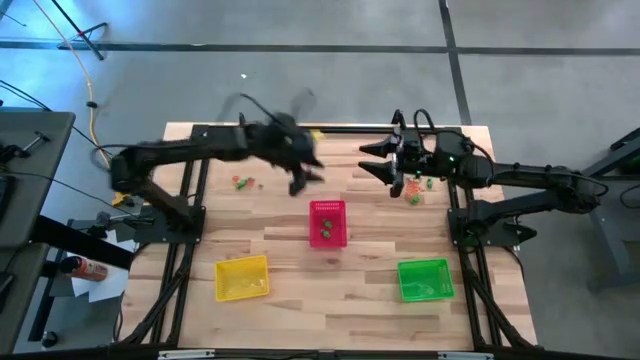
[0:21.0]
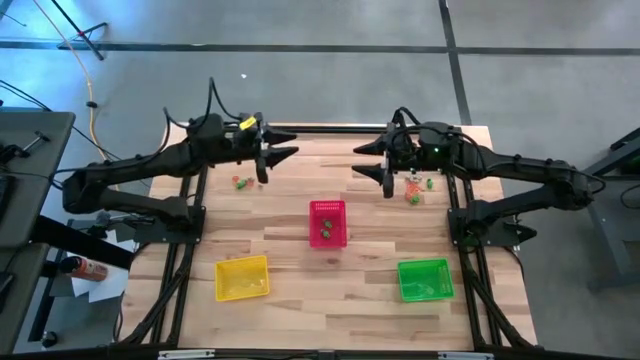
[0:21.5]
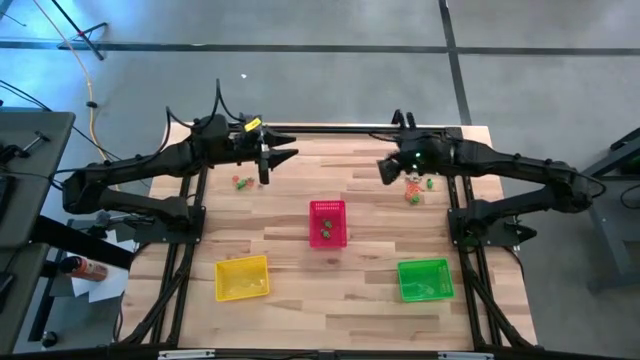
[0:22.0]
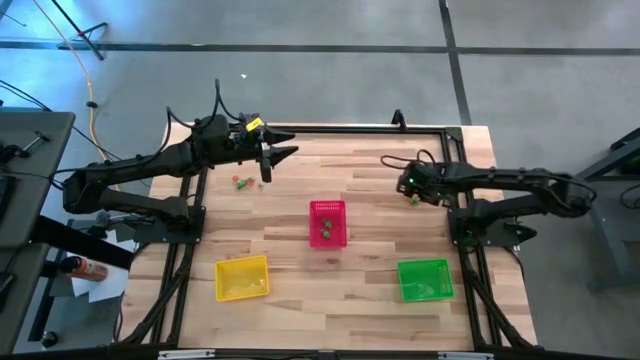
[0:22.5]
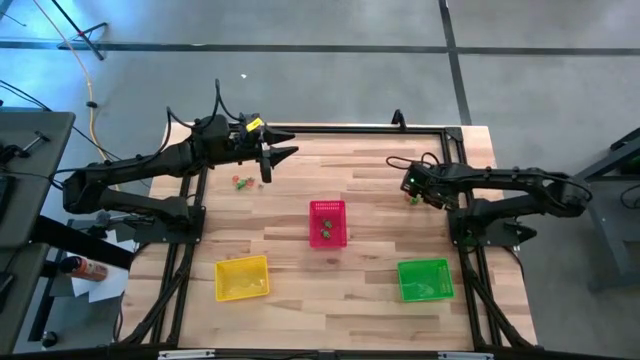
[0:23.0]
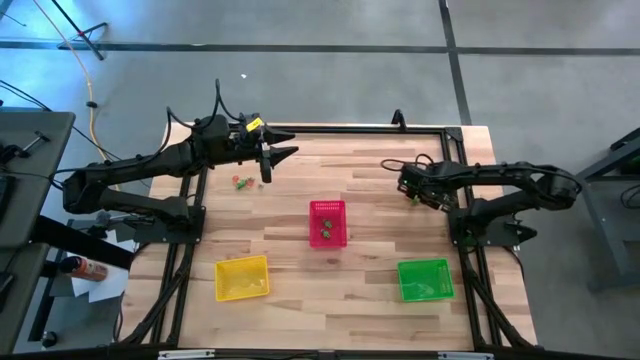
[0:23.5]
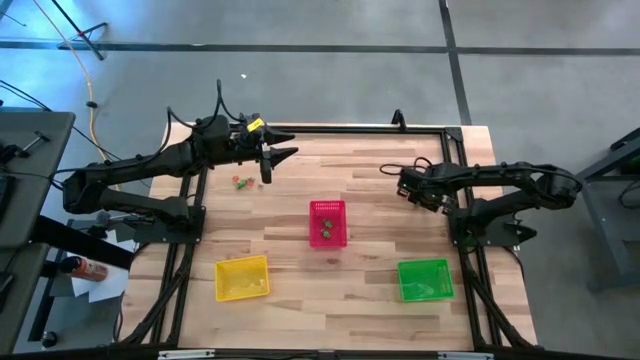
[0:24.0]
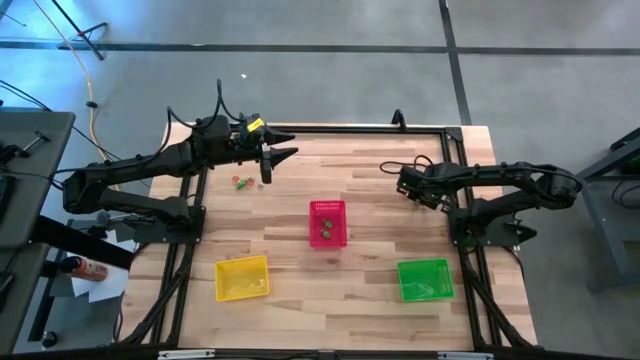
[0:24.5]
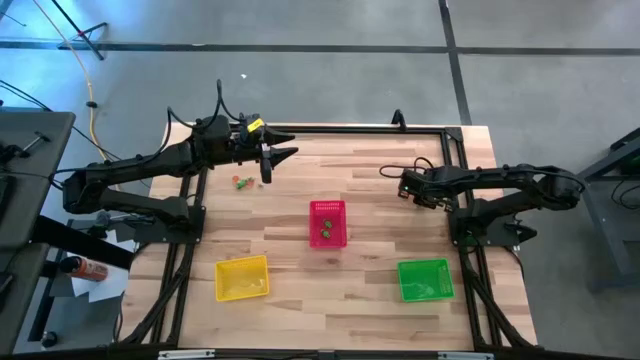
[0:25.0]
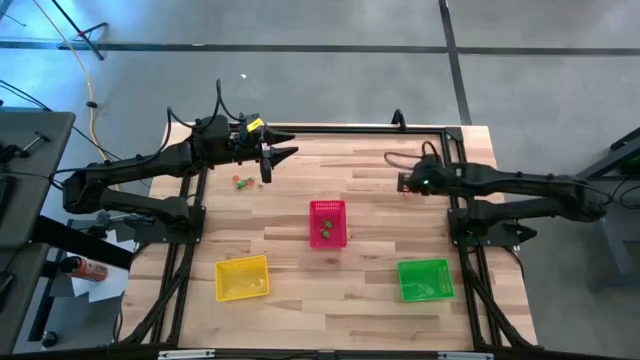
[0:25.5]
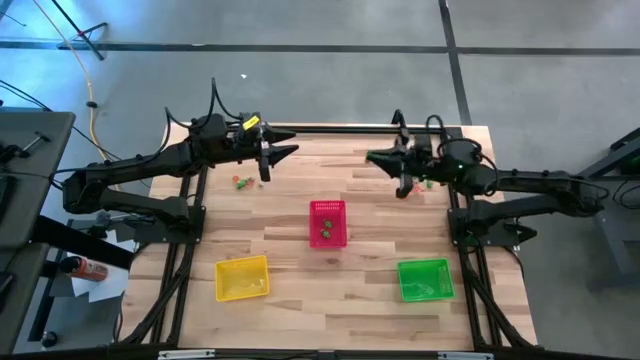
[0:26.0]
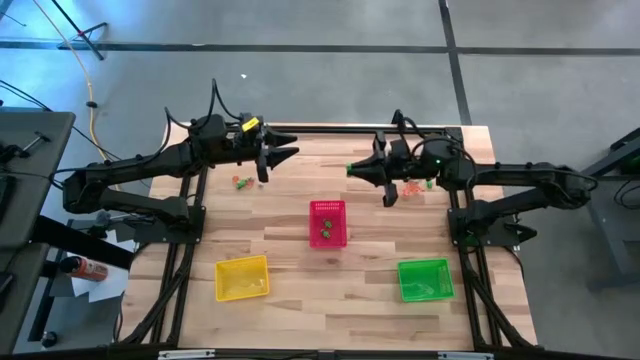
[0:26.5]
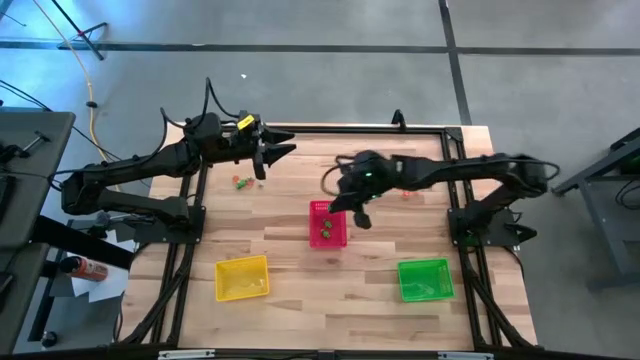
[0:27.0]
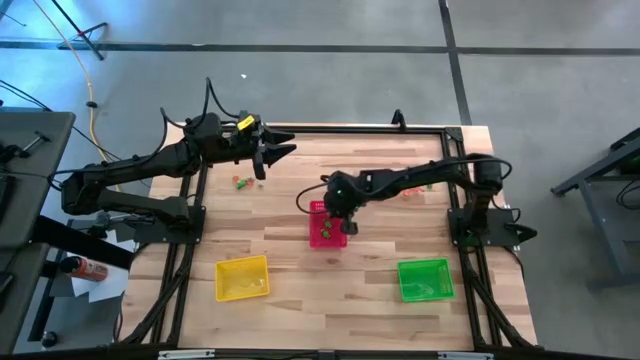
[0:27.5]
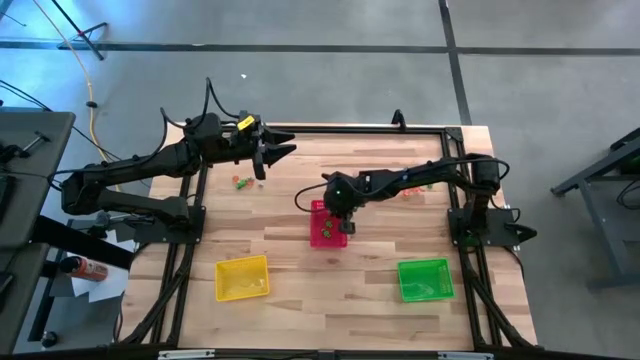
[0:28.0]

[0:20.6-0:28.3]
Task: Sort Halloween decoration
Put the green skeleton toy into the red bin

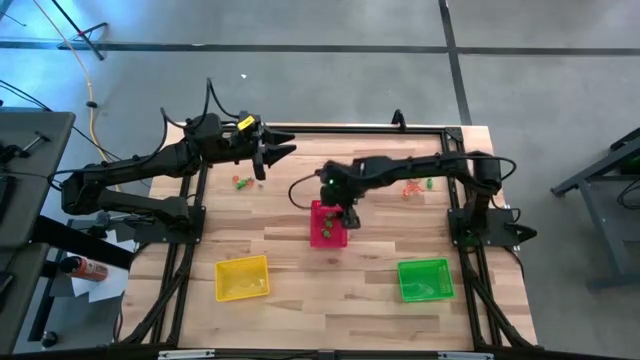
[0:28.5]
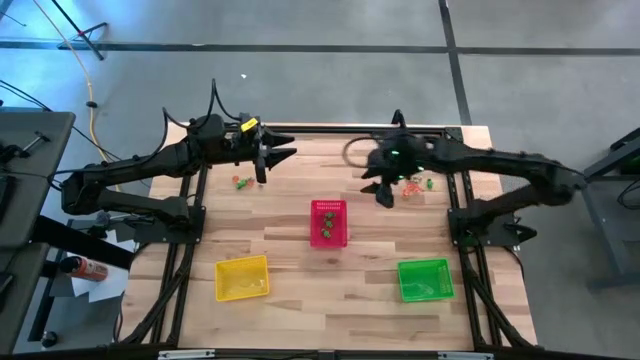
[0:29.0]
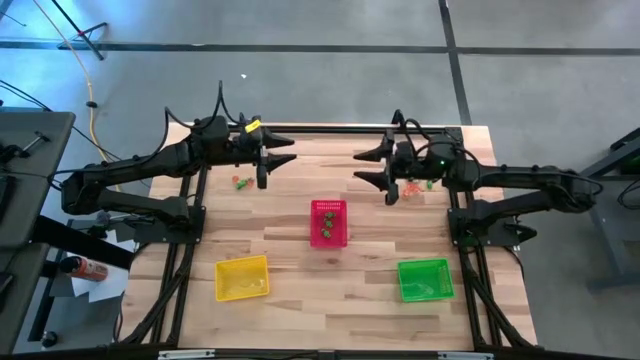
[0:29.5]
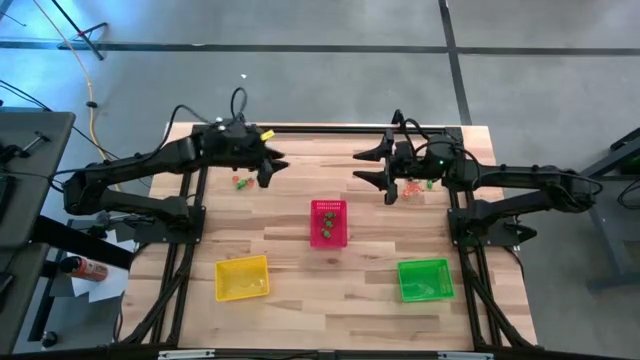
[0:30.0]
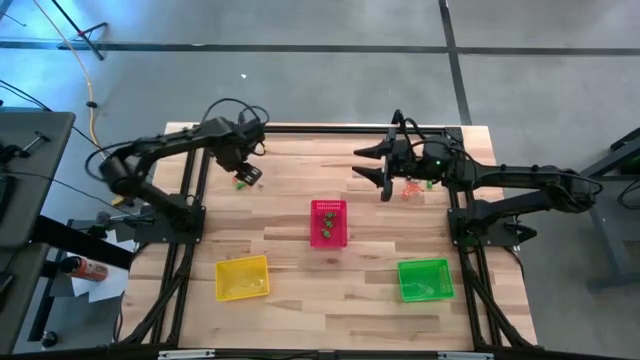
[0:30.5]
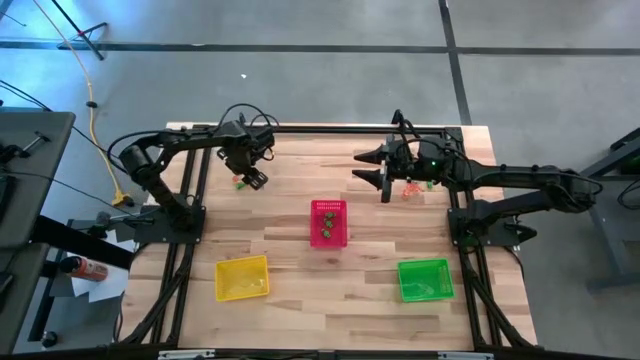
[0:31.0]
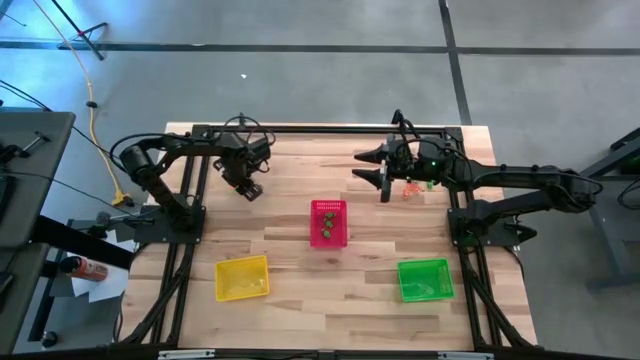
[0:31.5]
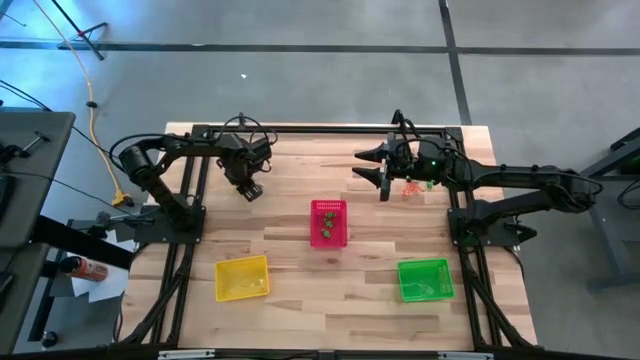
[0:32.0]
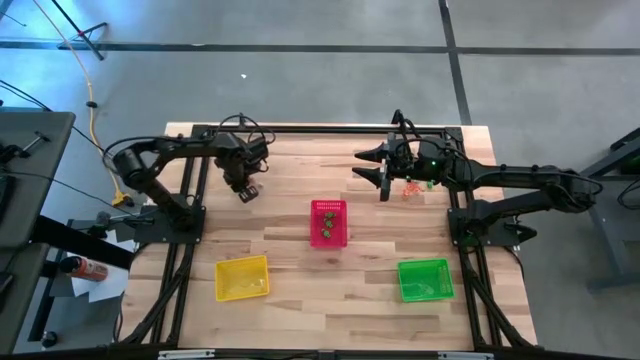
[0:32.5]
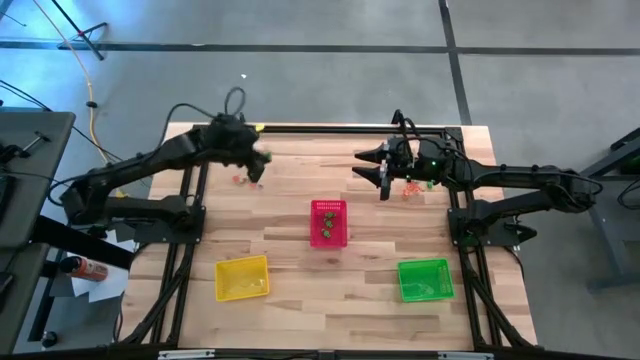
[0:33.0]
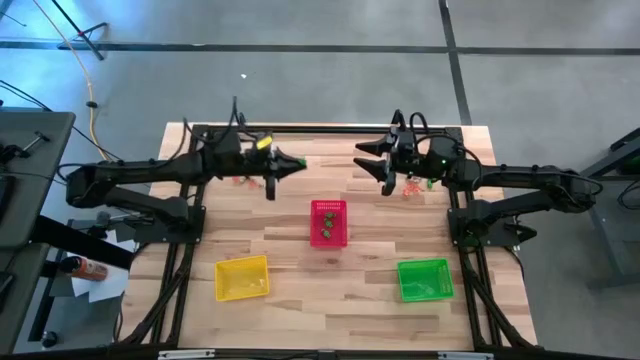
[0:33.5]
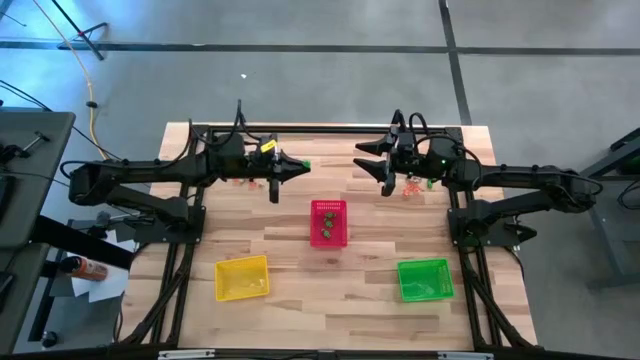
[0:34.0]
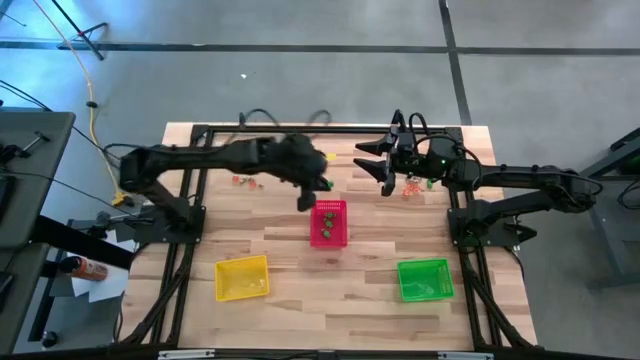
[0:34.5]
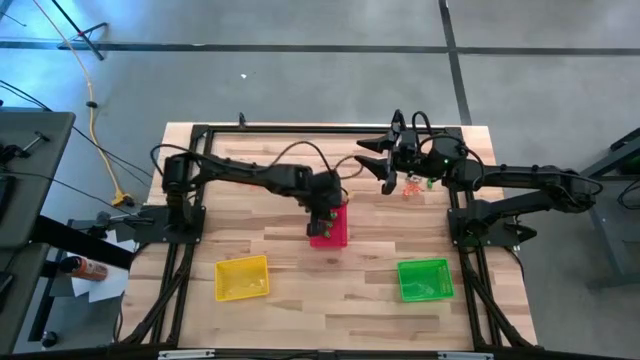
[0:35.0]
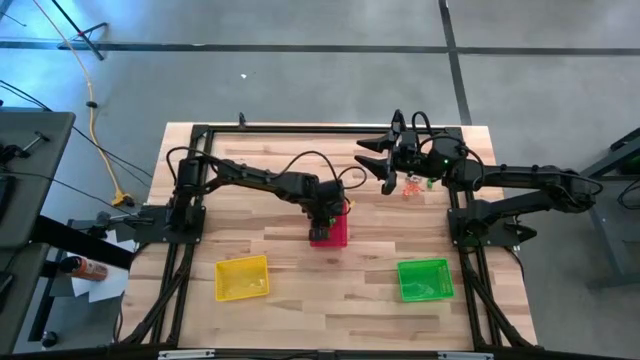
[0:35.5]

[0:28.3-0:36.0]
Put the green skeleton toy into the red bin

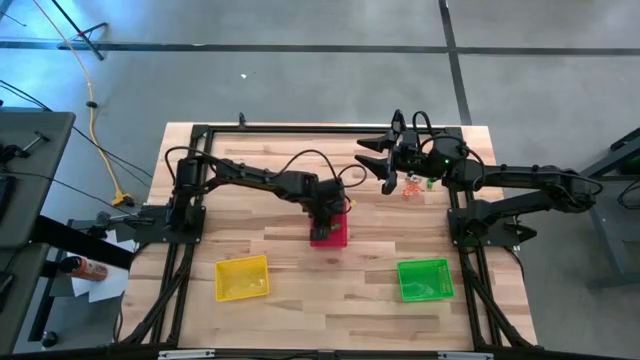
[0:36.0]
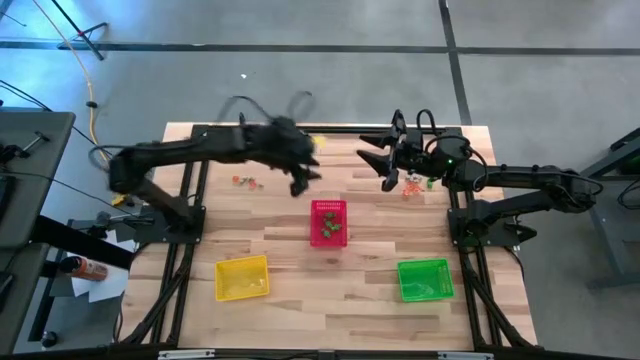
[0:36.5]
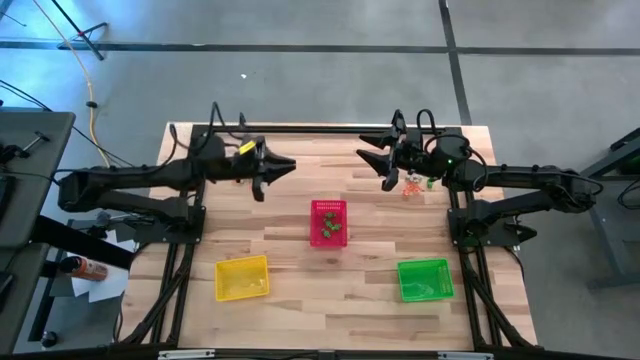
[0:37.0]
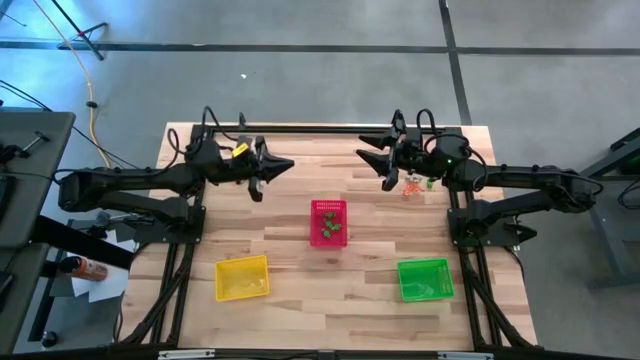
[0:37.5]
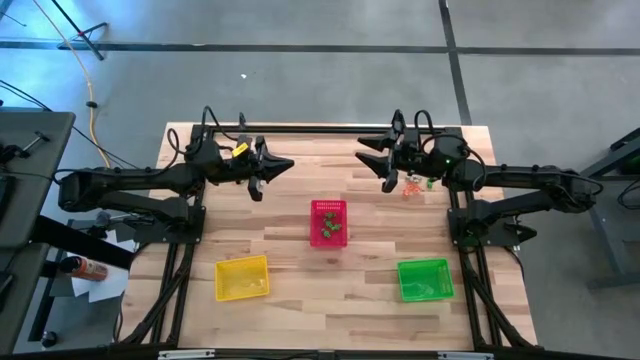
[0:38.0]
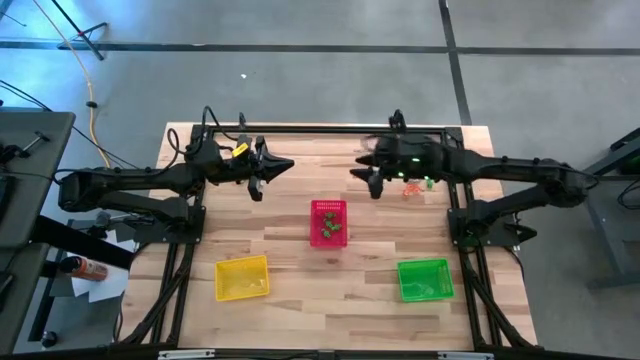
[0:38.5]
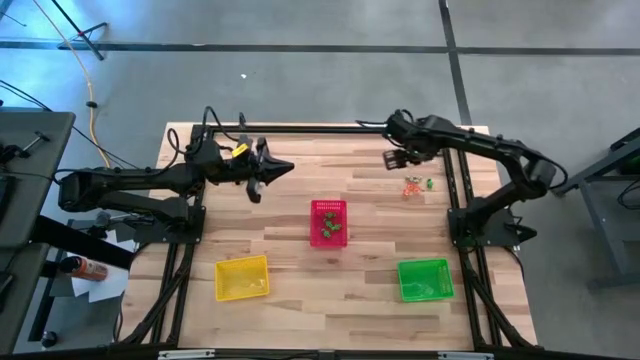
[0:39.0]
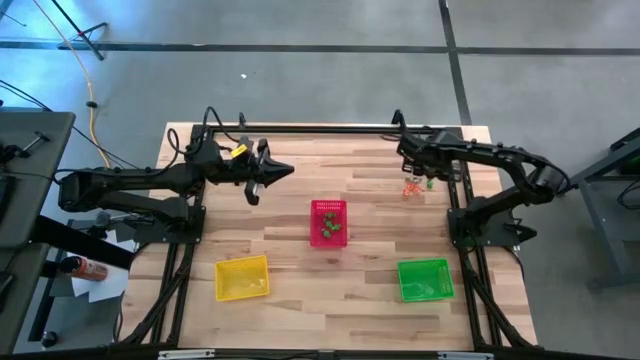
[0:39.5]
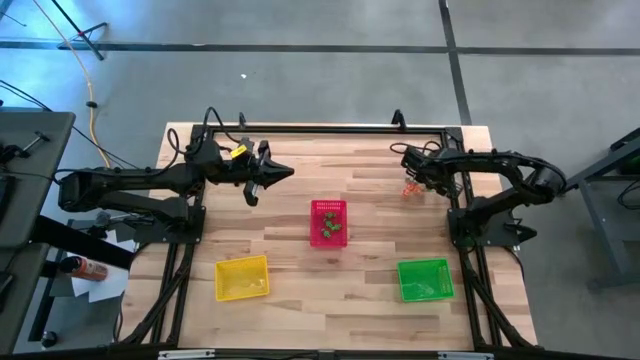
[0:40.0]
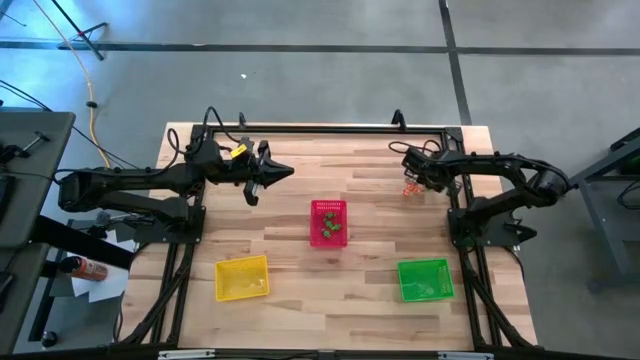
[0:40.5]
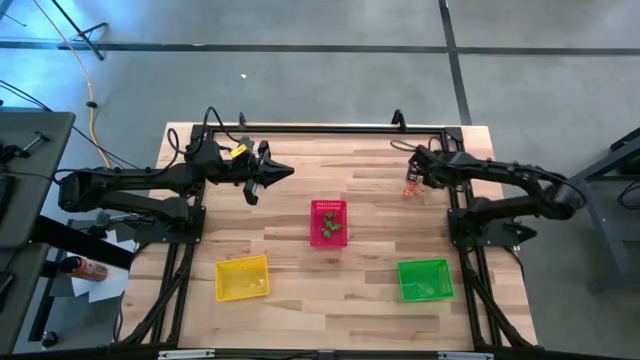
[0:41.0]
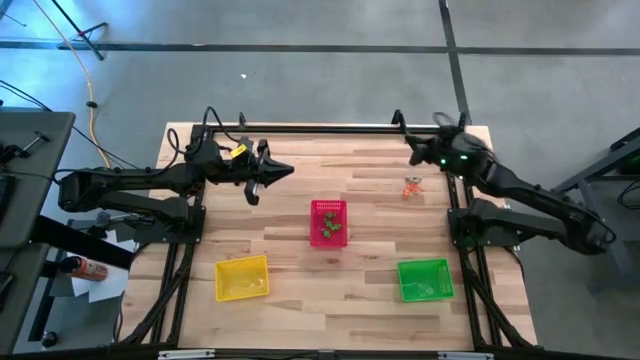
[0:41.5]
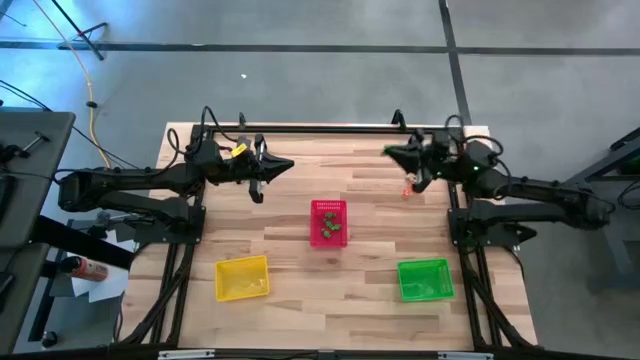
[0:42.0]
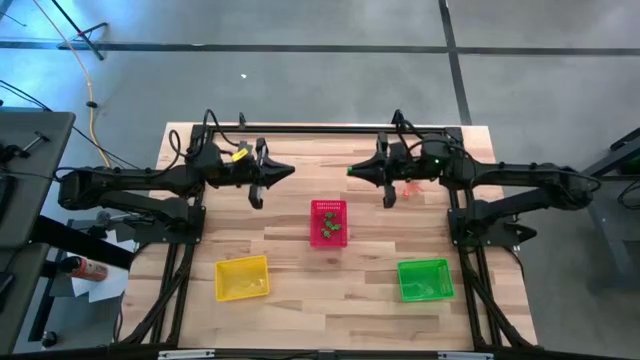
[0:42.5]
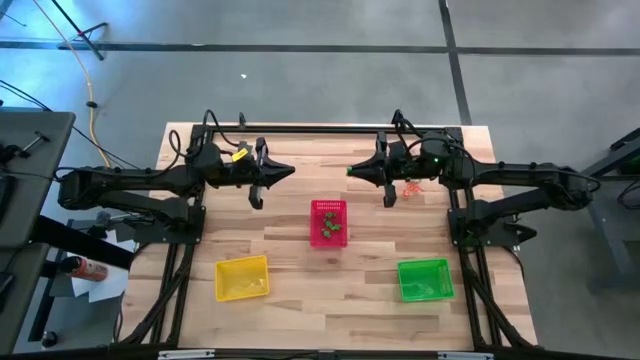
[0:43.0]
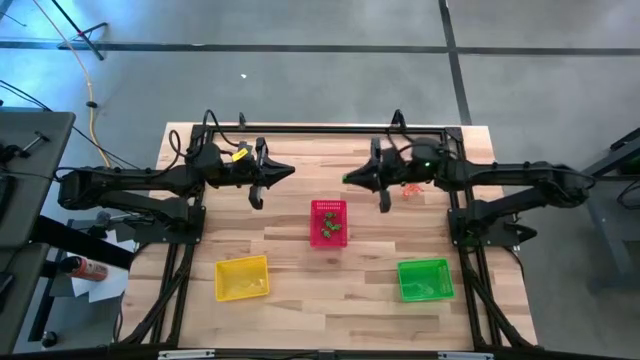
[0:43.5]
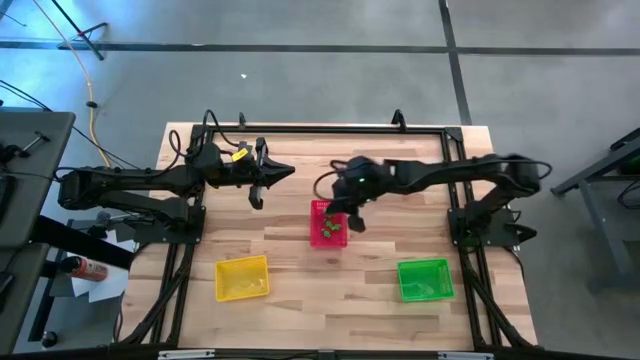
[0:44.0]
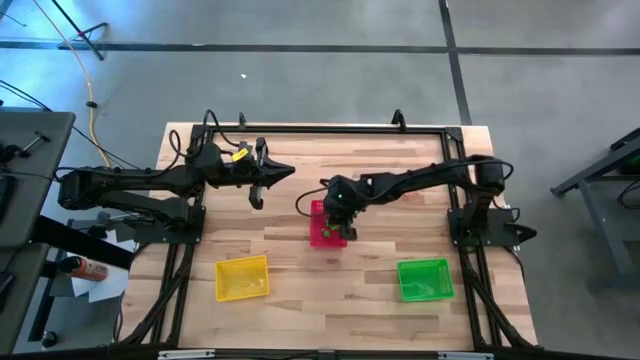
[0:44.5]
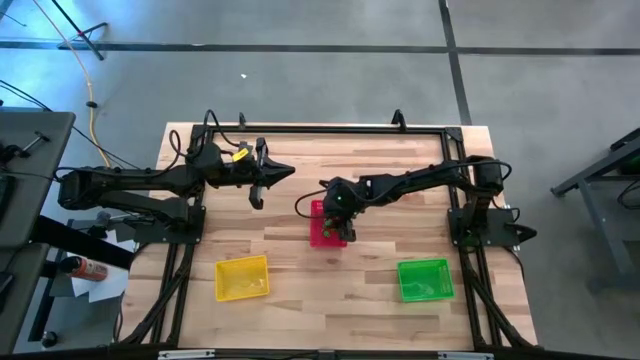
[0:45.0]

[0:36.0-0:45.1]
Put the green skeleton toy into the red bin
